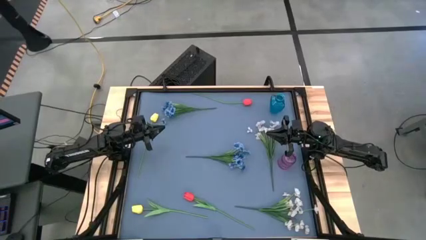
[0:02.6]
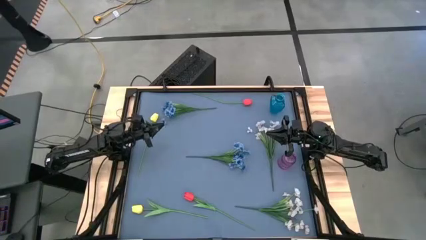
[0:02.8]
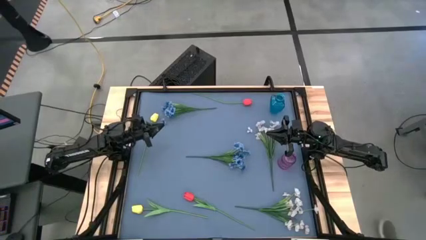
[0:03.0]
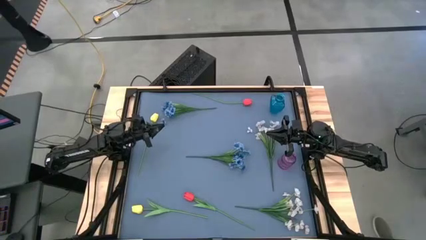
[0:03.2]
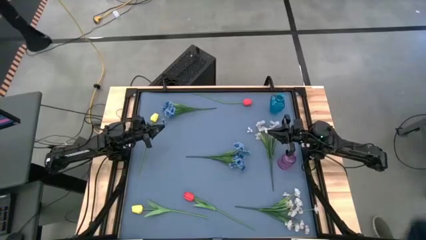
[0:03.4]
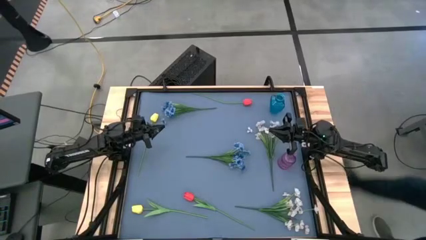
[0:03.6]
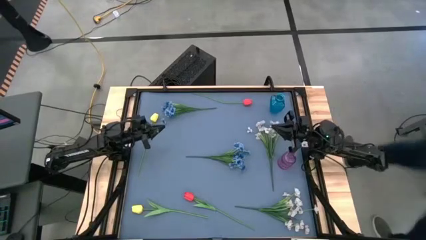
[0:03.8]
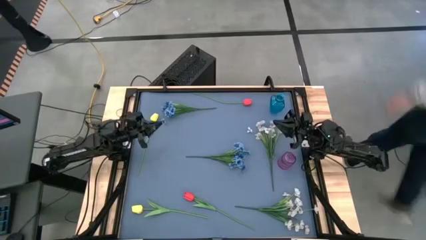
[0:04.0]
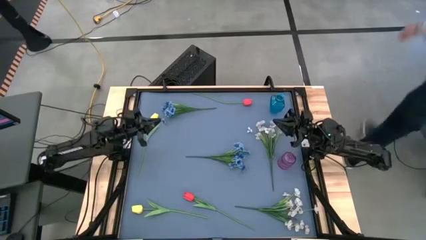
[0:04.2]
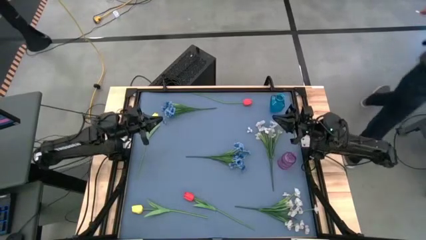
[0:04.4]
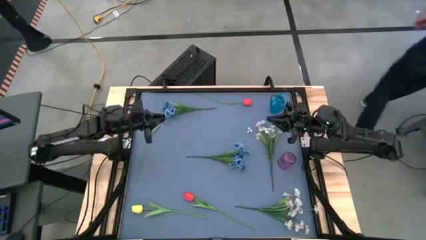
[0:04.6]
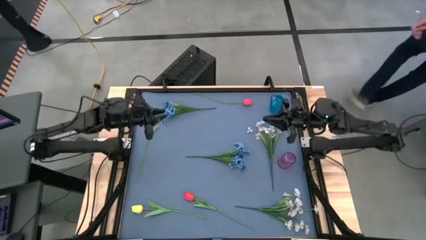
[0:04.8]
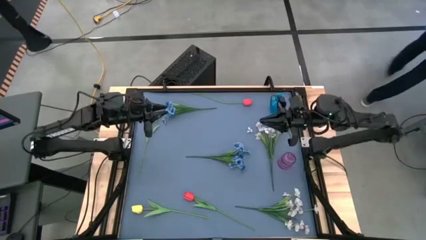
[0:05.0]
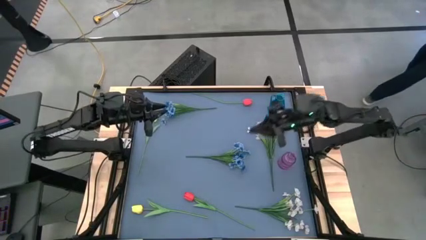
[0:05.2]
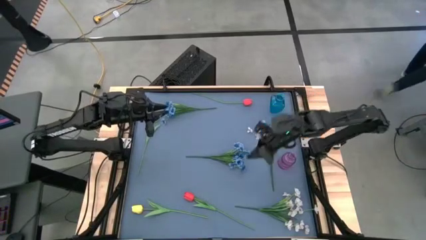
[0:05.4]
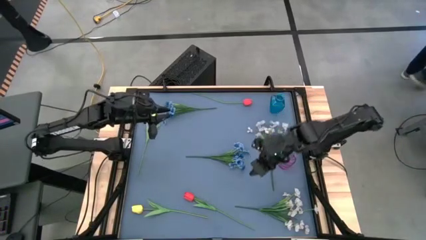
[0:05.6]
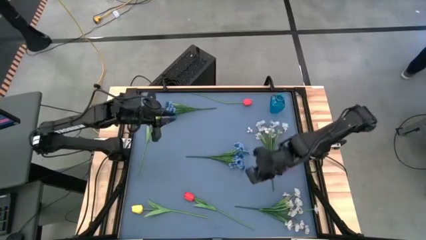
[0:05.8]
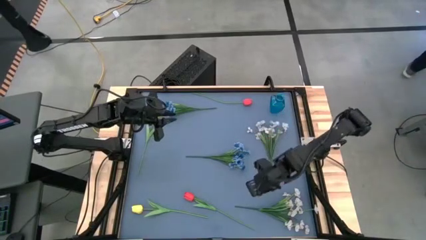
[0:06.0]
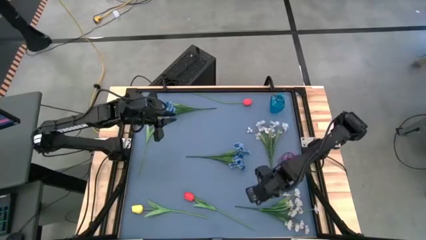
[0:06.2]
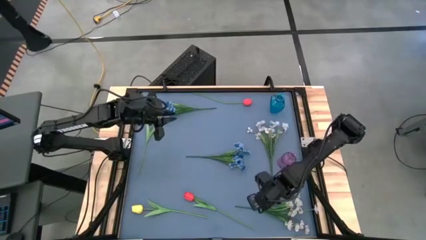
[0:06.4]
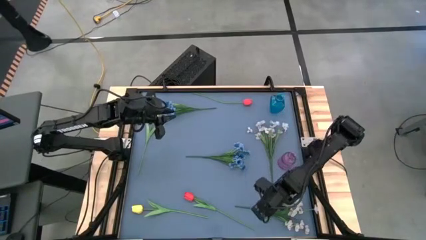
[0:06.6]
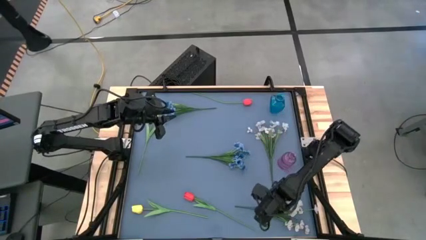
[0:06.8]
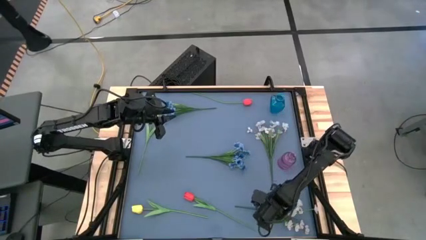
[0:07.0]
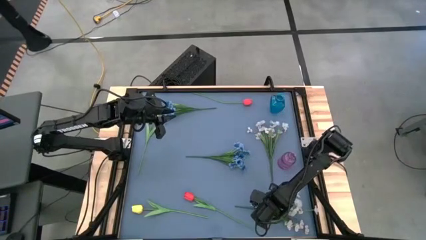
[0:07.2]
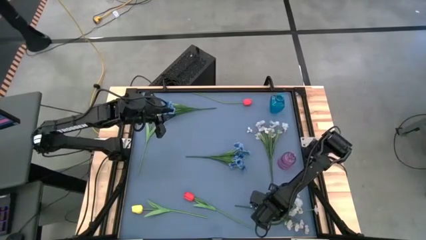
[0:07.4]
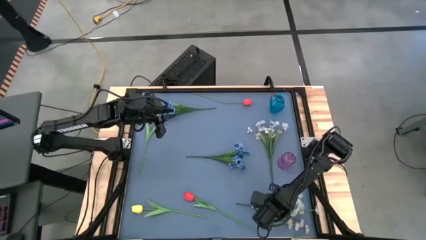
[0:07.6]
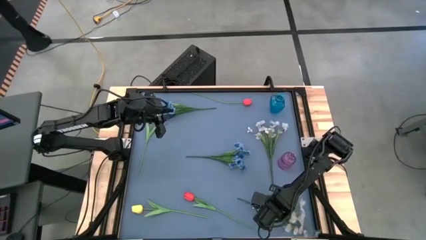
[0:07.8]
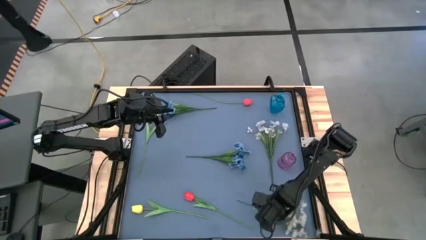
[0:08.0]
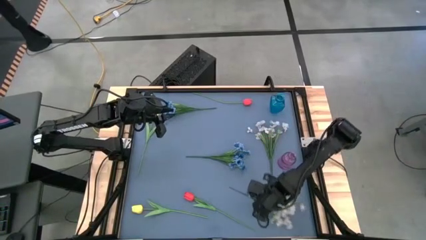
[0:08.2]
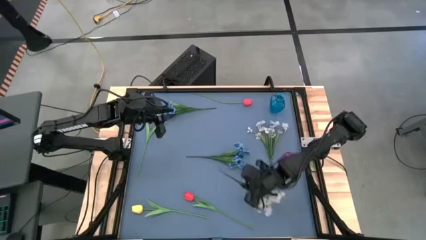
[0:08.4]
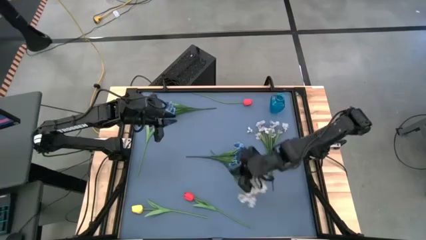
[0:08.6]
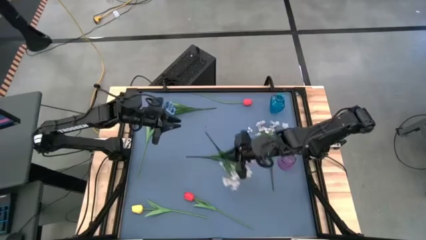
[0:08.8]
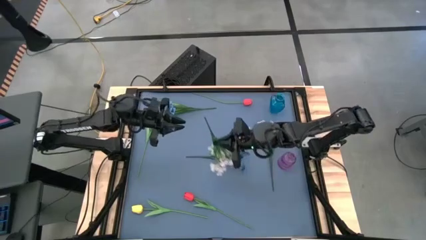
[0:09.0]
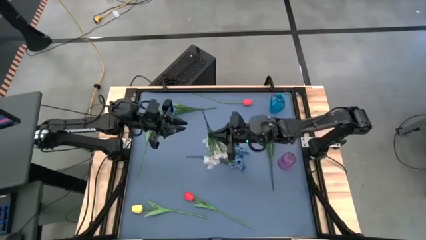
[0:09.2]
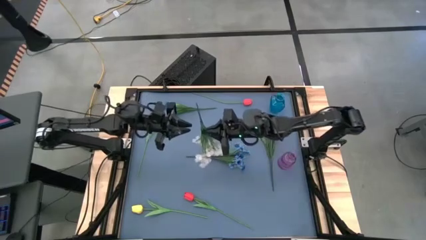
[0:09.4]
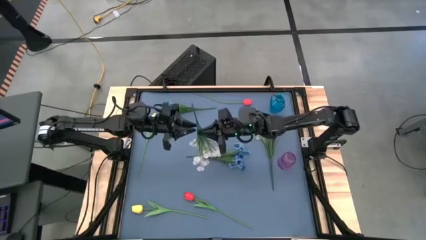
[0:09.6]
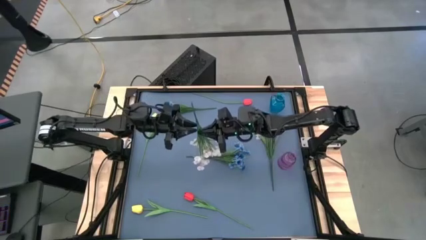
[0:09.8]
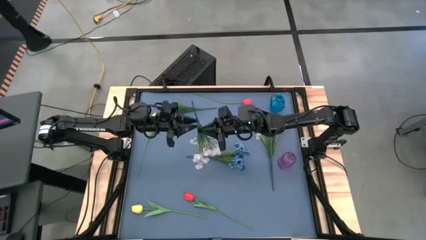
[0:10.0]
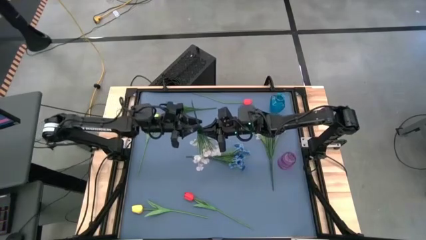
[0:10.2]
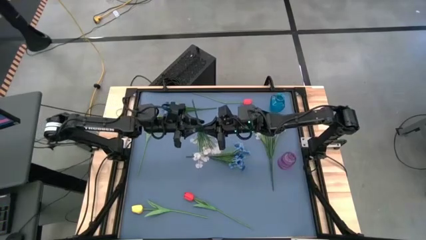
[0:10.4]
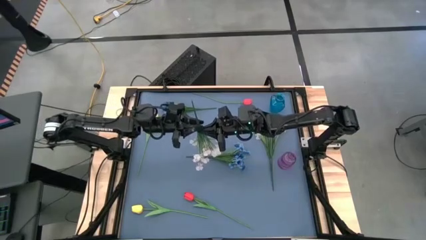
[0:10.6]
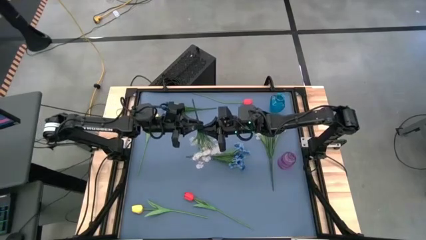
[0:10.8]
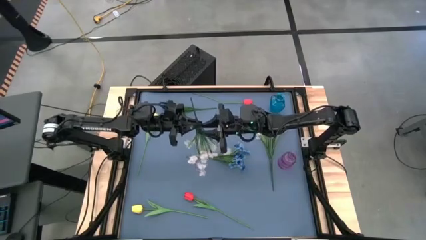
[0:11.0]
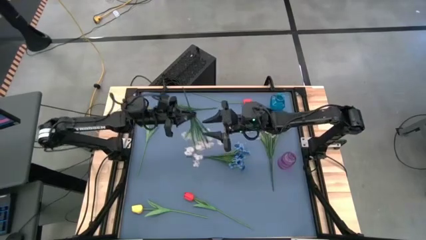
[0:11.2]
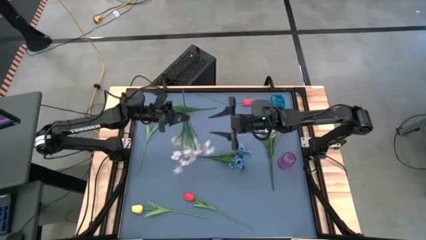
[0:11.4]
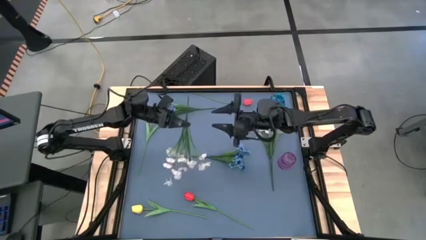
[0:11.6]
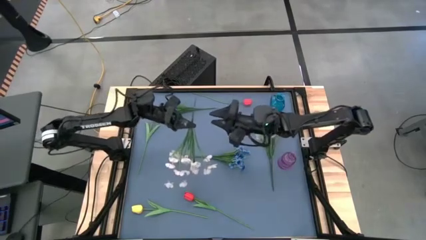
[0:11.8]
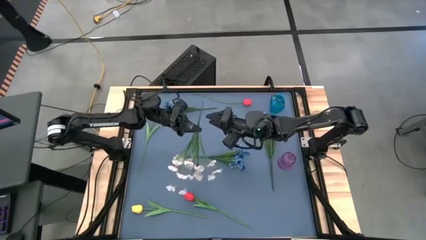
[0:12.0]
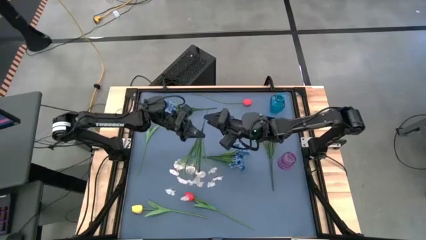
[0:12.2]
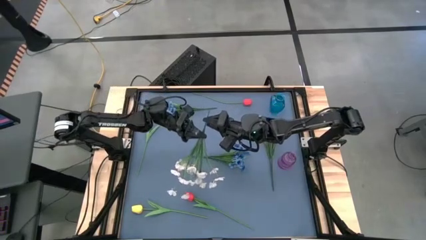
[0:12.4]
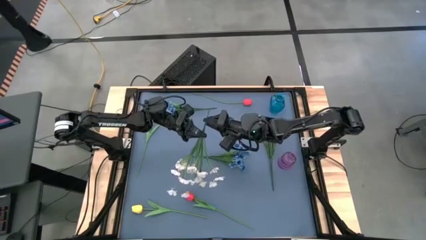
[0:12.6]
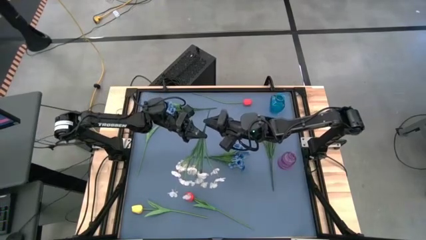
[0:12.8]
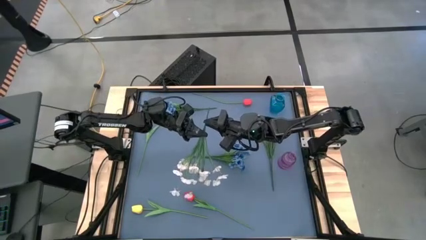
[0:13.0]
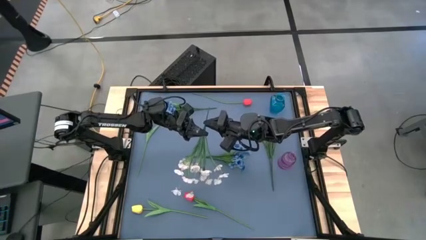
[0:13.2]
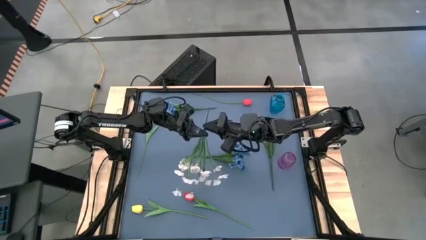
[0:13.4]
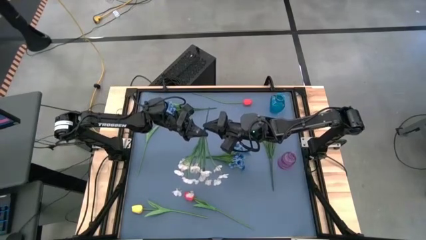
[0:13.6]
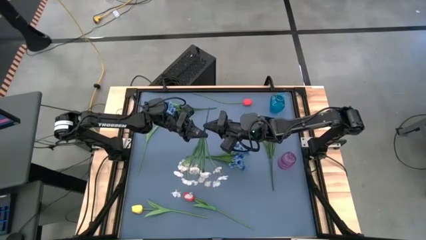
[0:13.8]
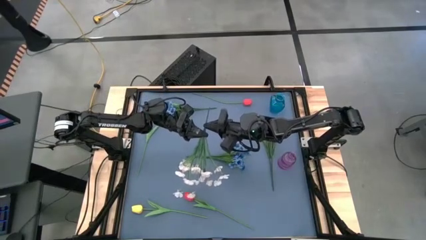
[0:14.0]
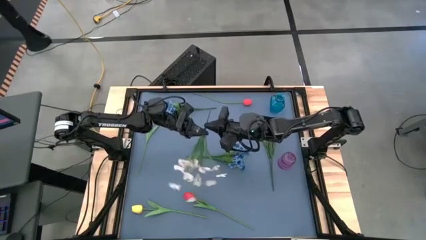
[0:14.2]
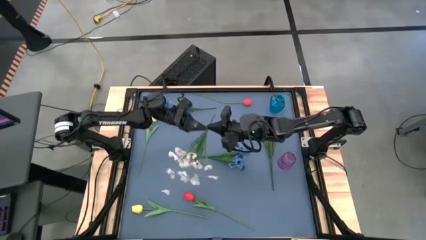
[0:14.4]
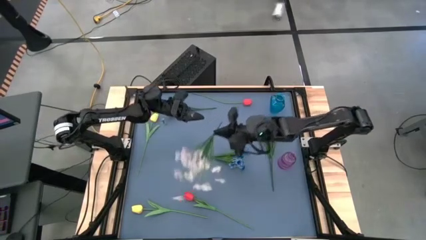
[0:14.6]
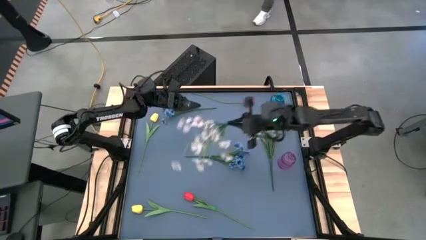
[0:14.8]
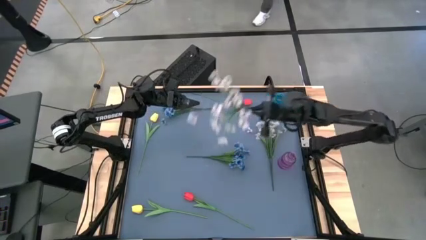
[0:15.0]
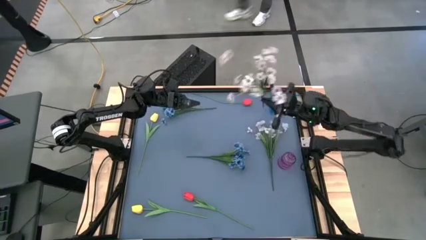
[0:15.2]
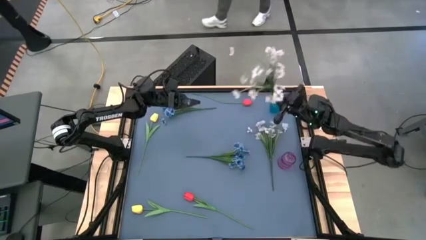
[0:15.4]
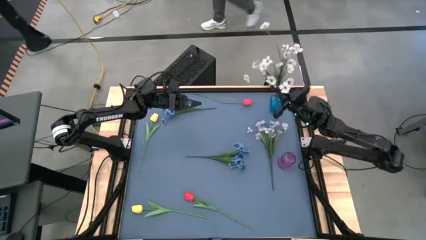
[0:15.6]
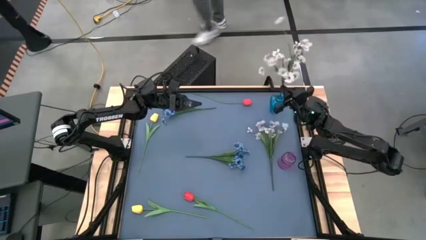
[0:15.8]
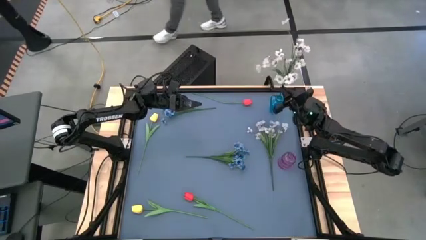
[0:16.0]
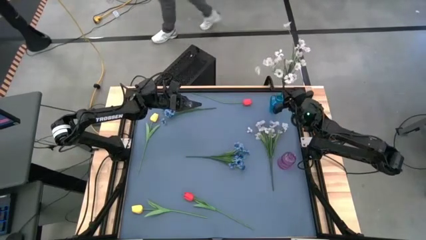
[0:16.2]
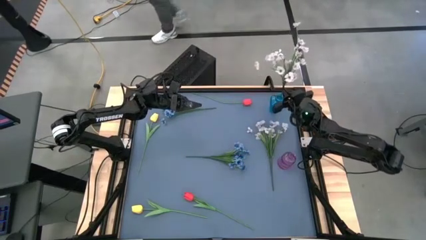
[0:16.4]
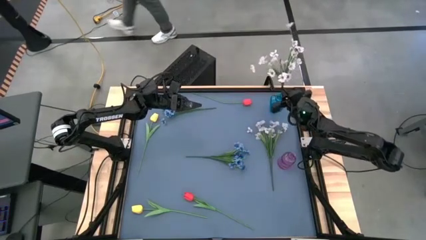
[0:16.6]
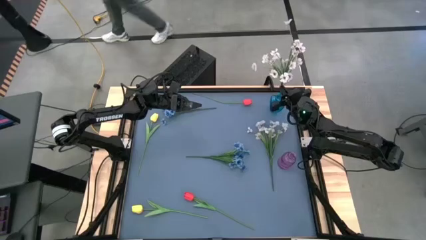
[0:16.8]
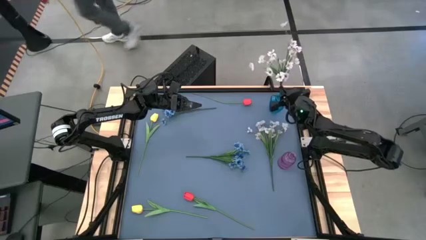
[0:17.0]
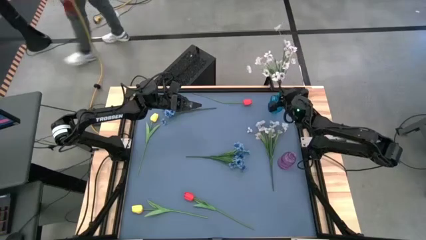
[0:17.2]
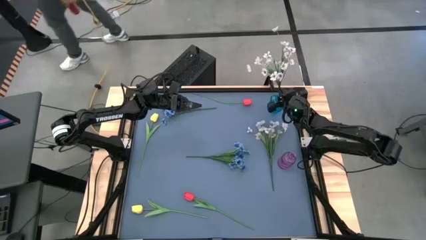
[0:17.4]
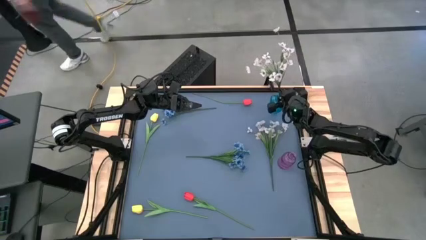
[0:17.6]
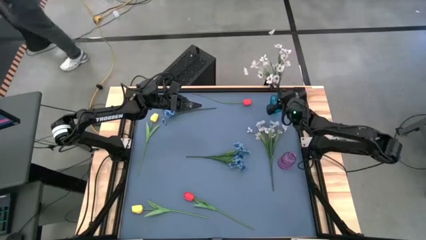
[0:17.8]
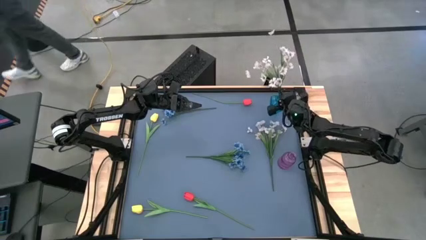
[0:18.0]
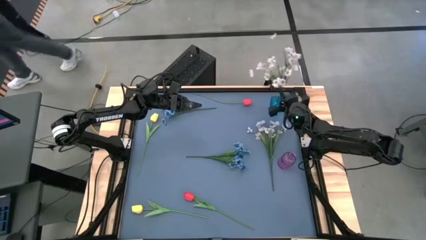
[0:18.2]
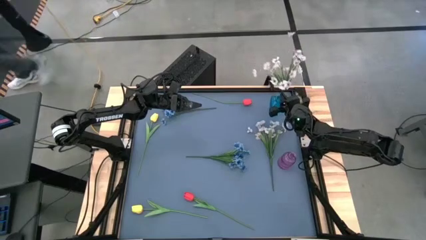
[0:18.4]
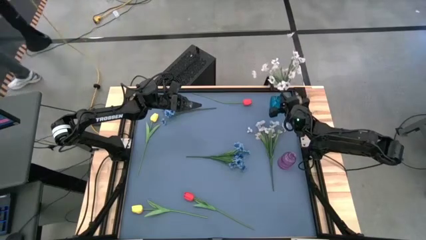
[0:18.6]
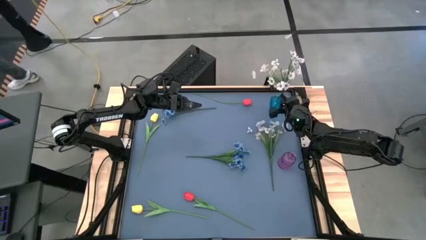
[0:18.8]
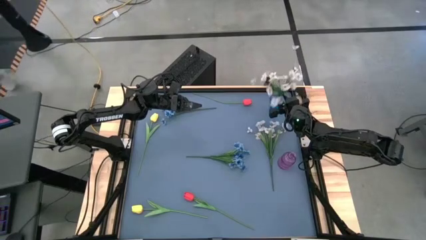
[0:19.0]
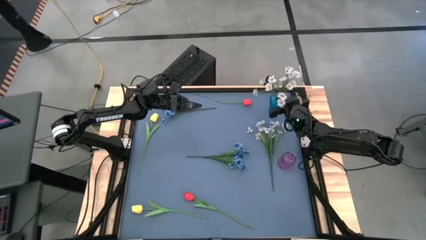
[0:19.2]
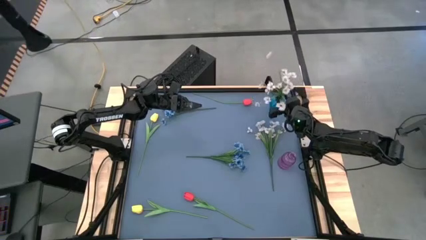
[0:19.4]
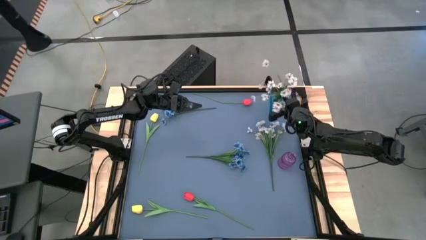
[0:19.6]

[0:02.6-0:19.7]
Task: Sort flowers into vase by color
Put the bottom white flowers into the blue vase
